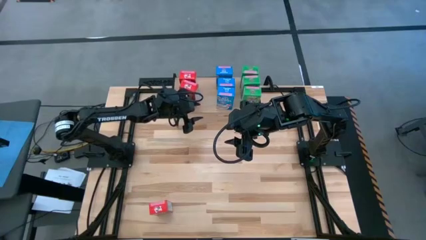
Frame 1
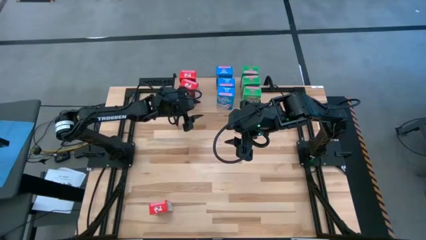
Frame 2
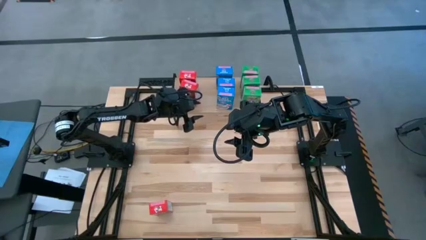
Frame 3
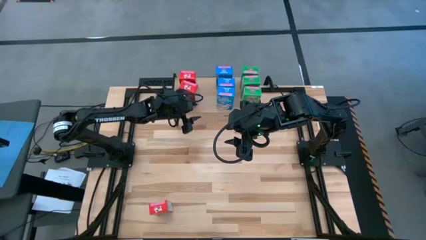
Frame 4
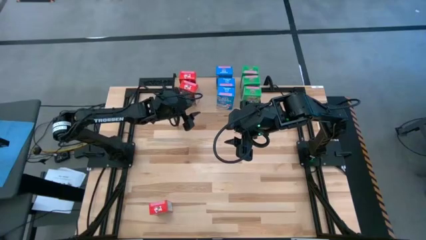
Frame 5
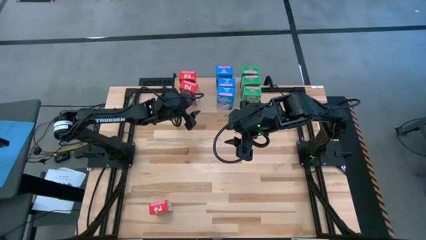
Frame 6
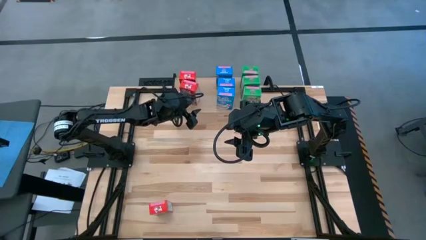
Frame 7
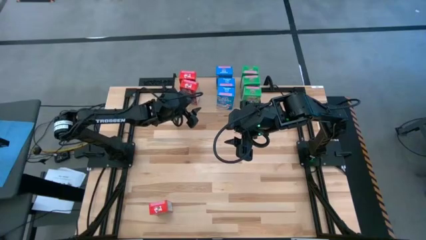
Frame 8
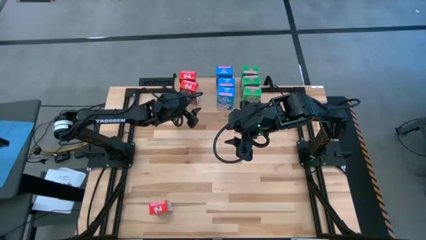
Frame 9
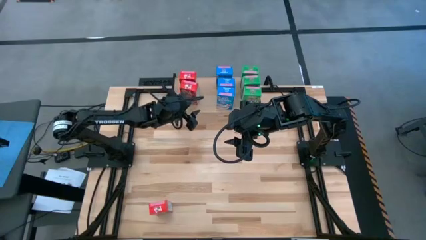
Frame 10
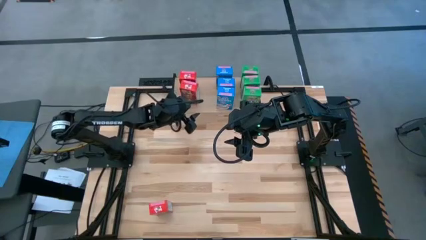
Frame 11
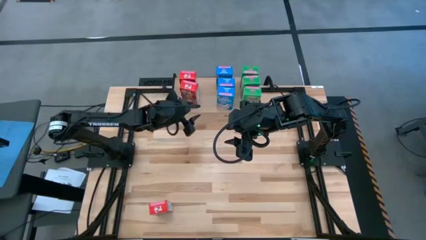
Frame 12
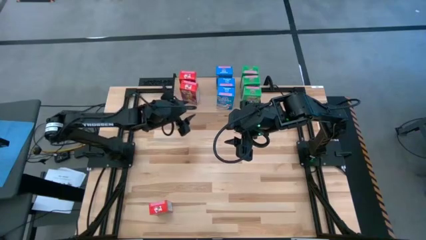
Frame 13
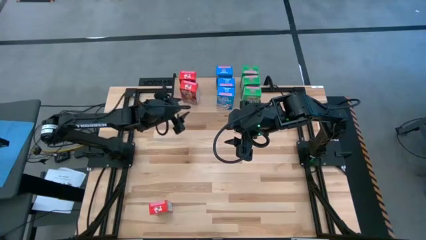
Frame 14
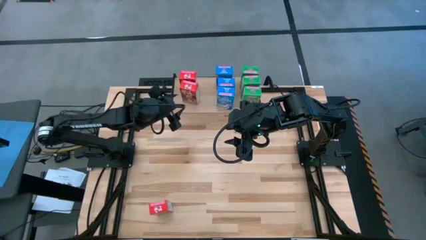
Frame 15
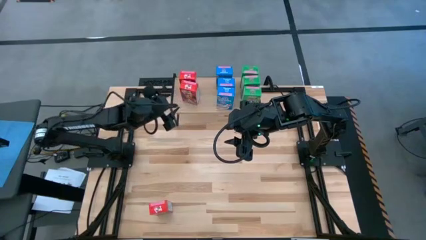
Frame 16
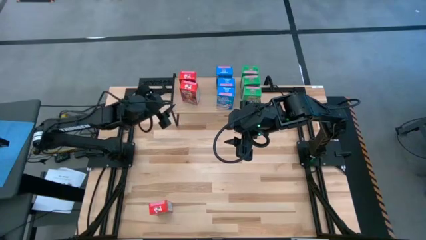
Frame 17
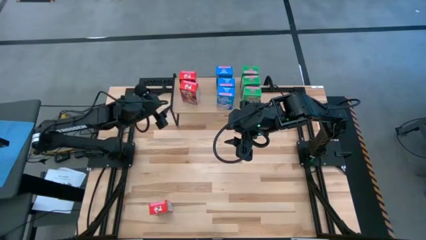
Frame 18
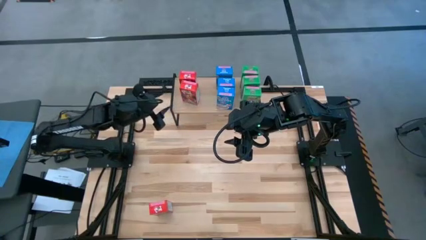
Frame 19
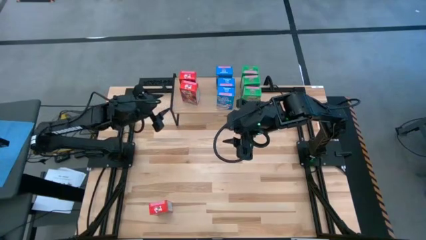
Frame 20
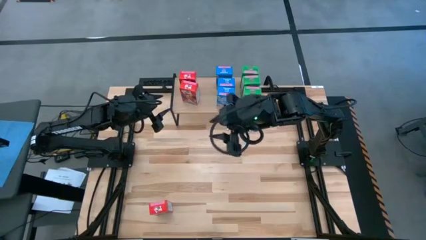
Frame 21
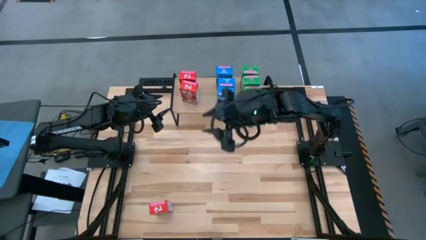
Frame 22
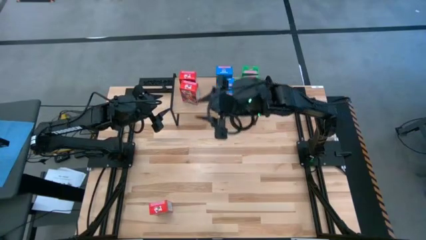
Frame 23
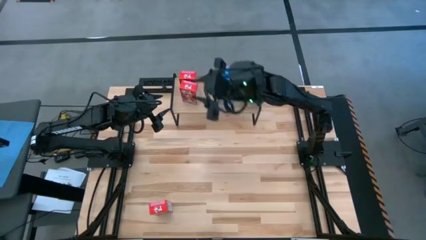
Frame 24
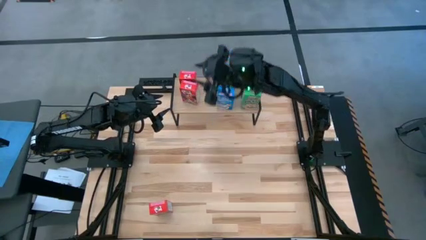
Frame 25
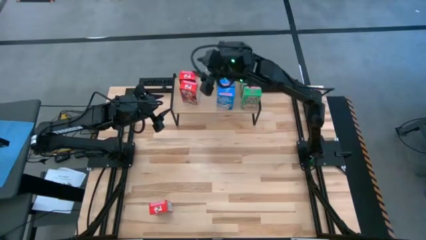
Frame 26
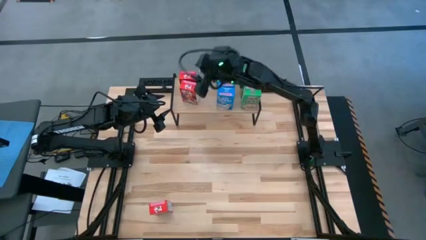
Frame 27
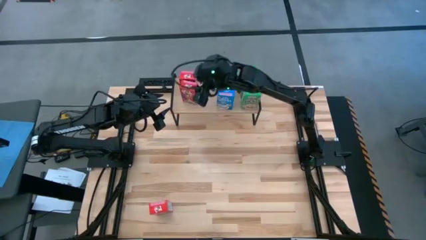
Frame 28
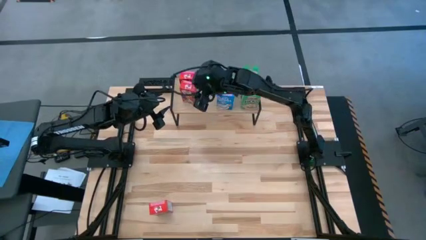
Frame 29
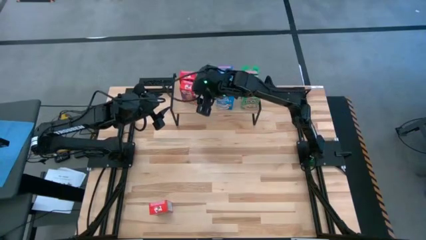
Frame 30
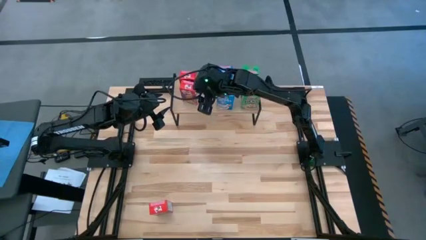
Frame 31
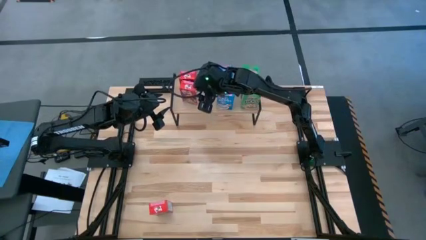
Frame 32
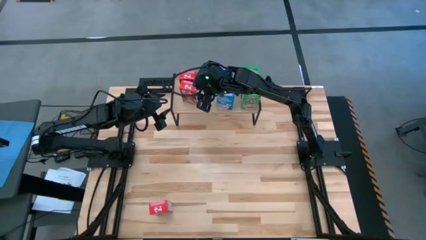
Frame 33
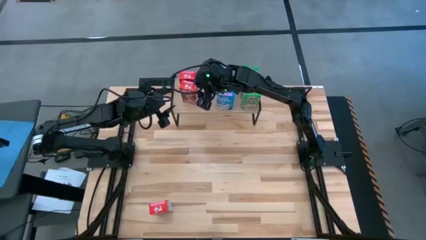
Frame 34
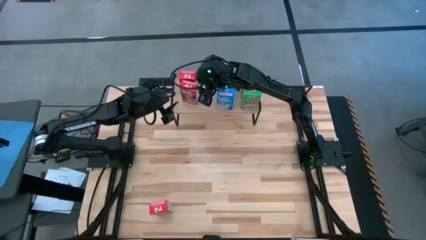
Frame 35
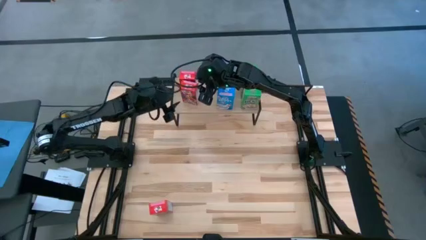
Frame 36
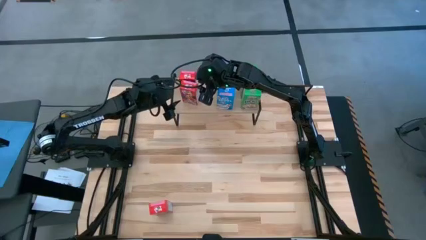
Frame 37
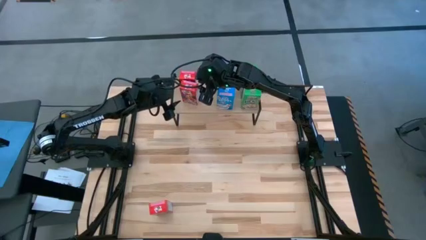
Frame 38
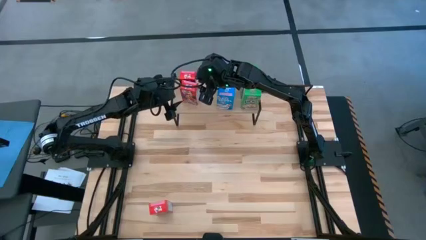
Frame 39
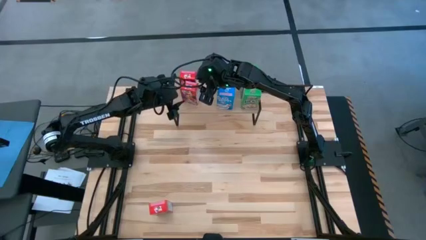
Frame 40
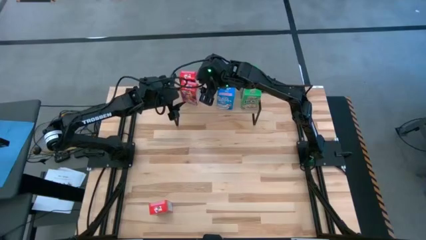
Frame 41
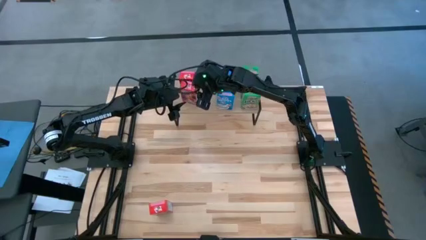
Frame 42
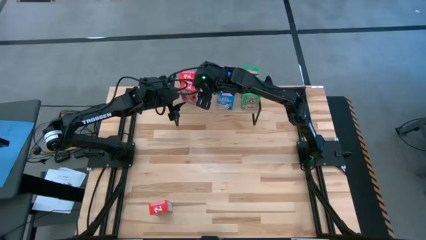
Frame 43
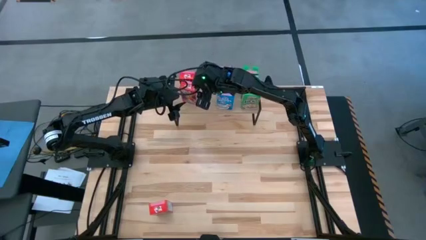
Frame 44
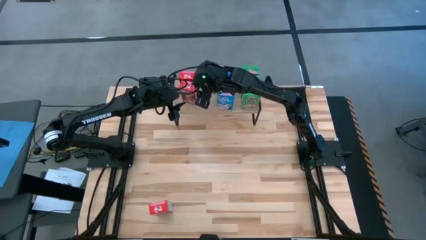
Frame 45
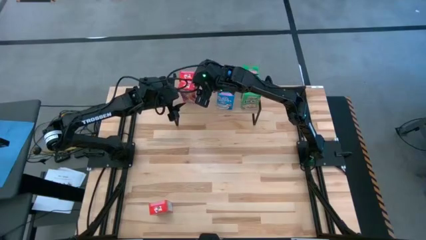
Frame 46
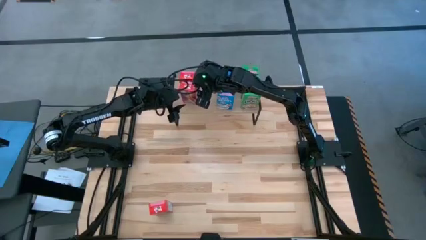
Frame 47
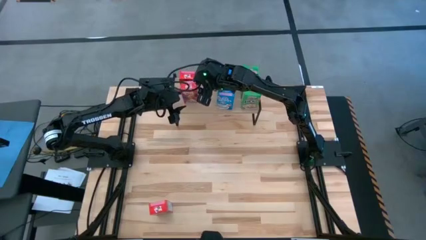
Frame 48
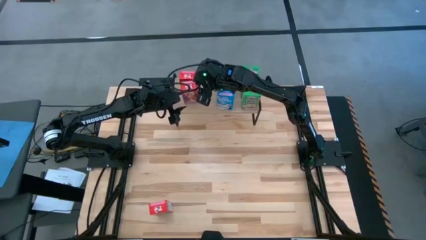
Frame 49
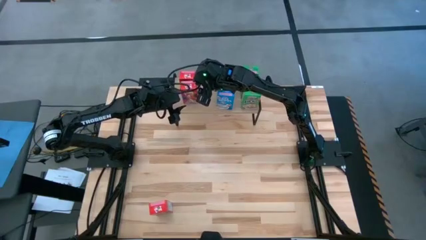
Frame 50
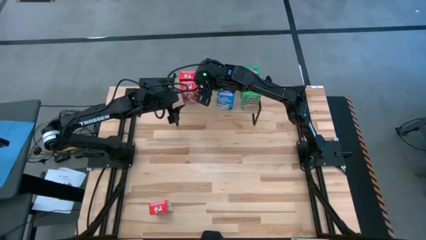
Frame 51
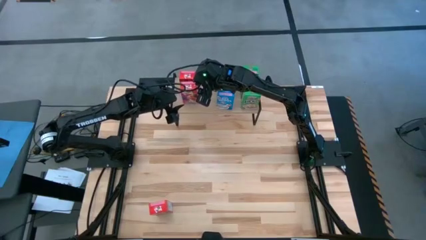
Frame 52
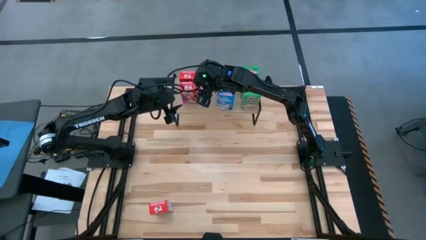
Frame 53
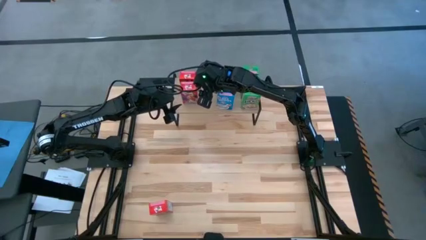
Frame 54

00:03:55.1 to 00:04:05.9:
Task: Stack cereal on shelf
Adjust the red cereal boxes on the shelf

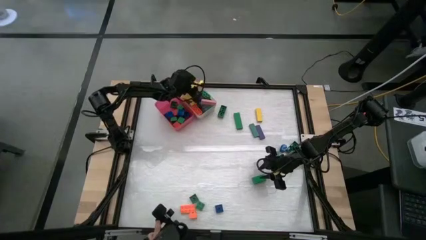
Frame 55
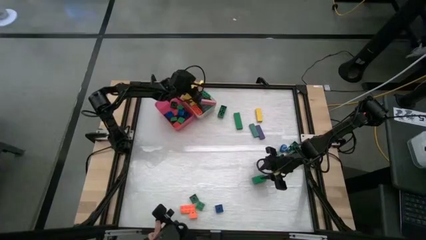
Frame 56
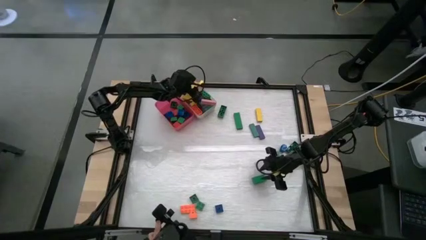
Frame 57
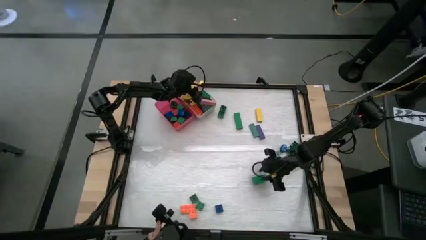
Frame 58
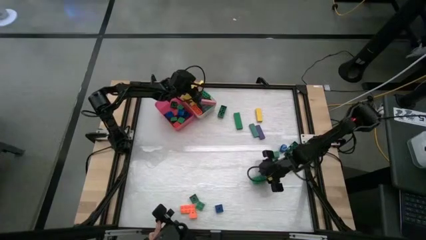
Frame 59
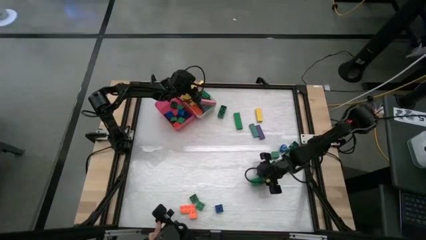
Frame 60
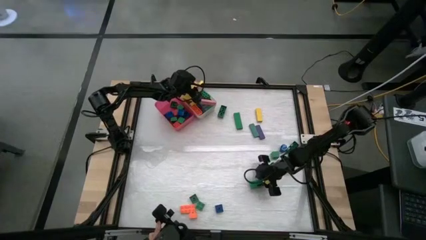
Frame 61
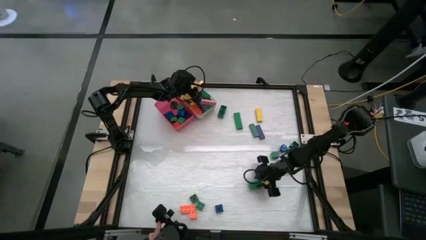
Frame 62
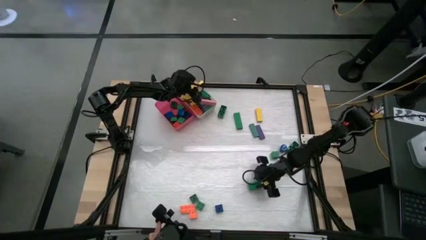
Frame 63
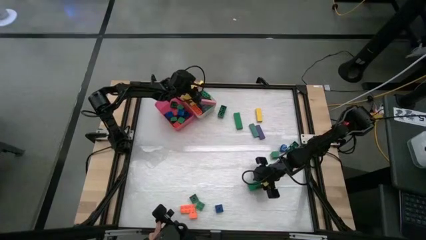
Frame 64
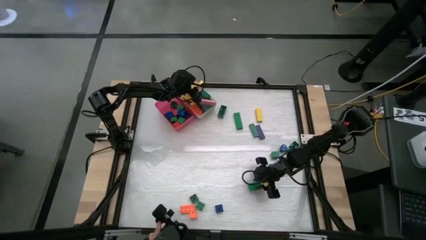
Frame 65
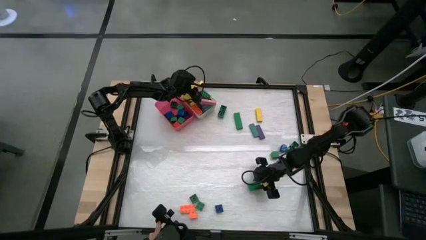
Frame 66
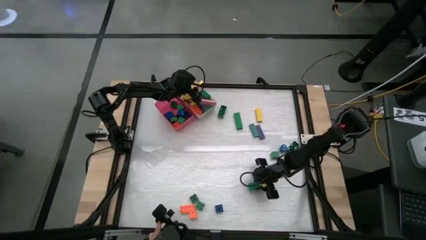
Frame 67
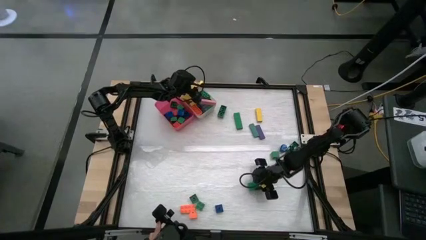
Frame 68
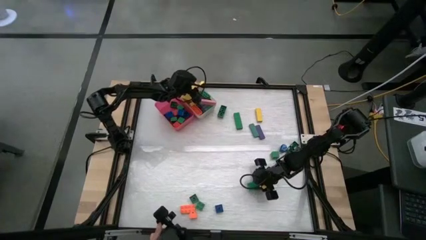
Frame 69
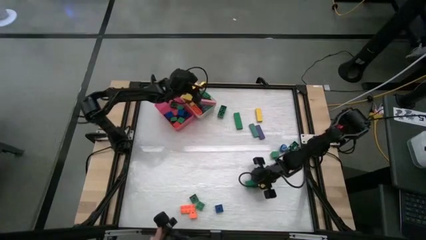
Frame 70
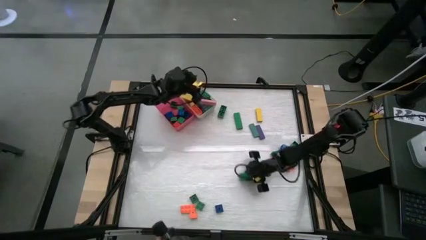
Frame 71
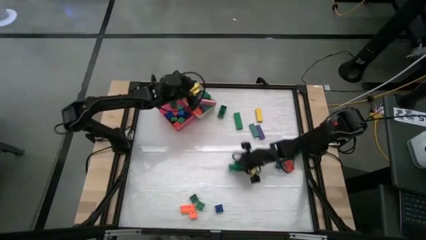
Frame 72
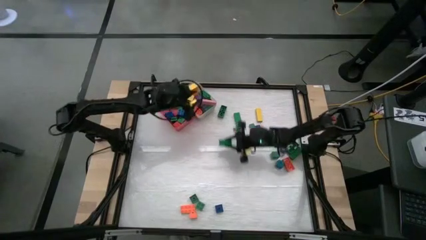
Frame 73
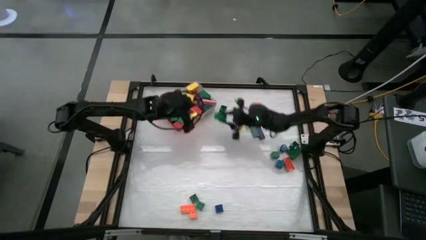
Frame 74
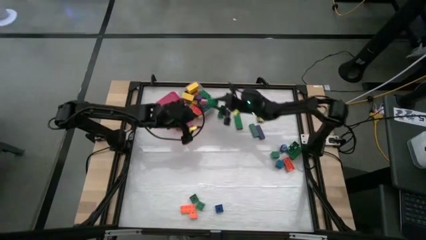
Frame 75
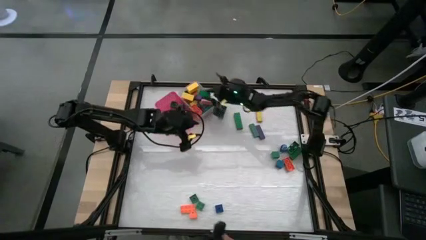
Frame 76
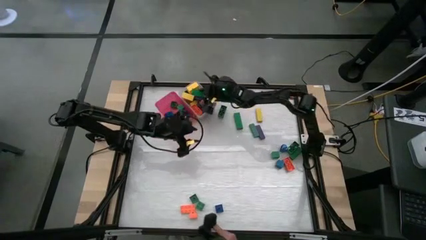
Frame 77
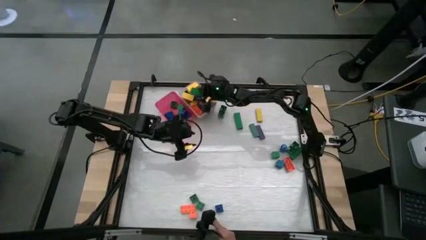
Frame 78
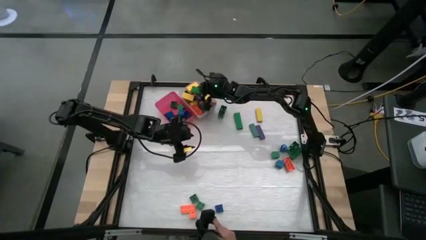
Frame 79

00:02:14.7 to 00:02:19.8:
Task: Sort blocks by size
Put the big green block into the white bin
